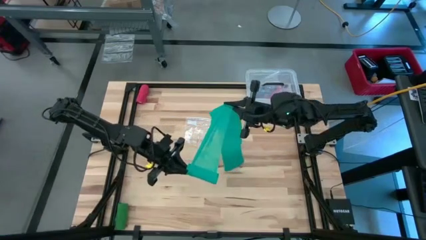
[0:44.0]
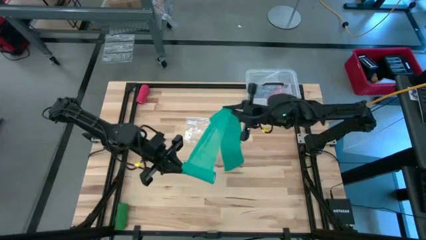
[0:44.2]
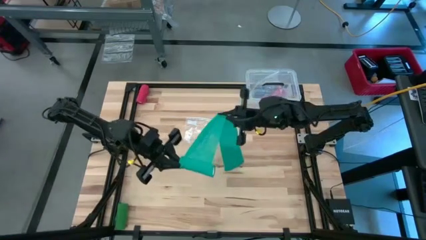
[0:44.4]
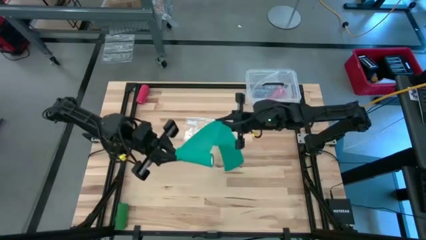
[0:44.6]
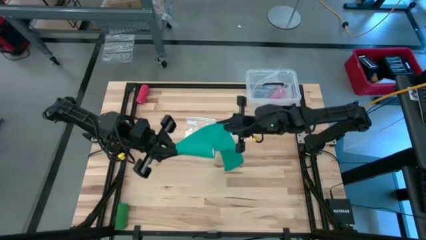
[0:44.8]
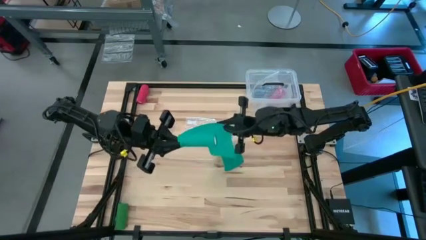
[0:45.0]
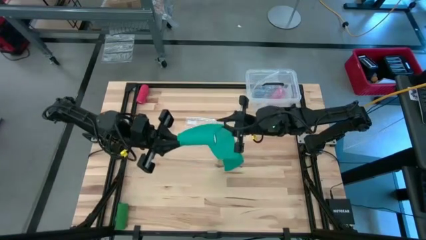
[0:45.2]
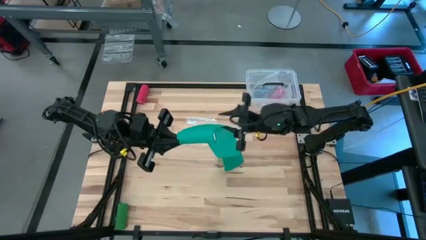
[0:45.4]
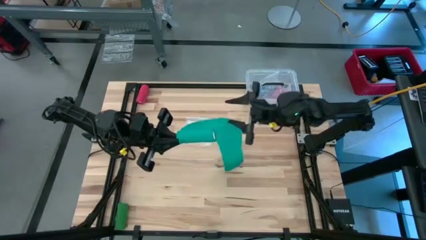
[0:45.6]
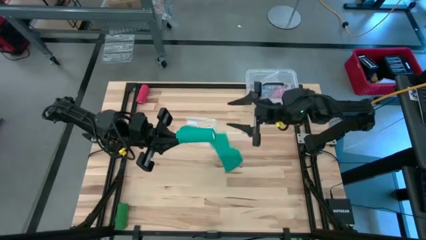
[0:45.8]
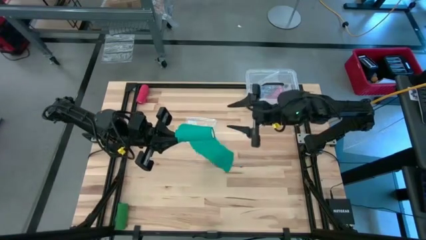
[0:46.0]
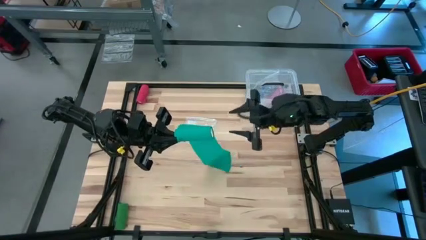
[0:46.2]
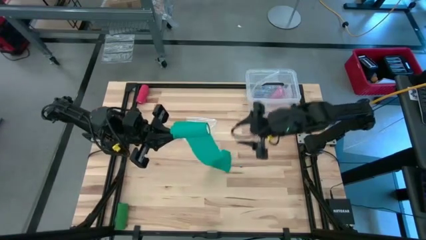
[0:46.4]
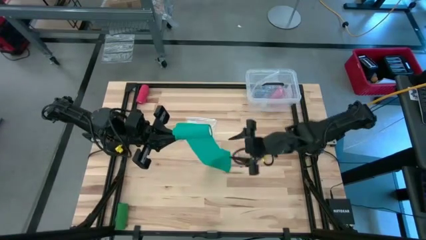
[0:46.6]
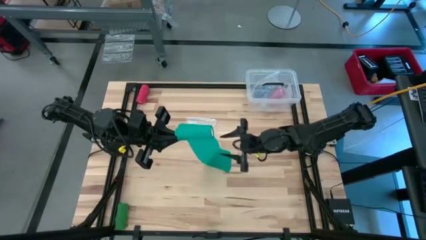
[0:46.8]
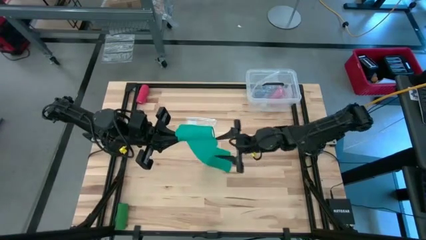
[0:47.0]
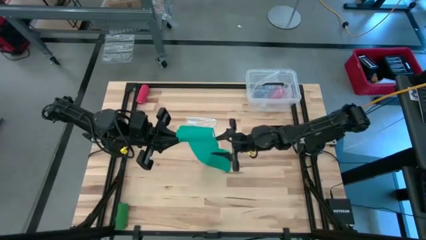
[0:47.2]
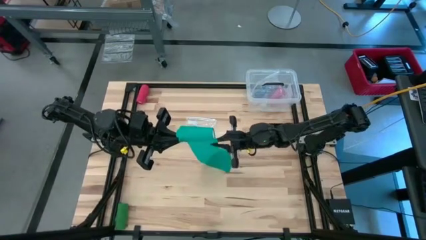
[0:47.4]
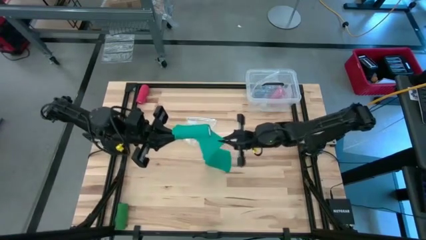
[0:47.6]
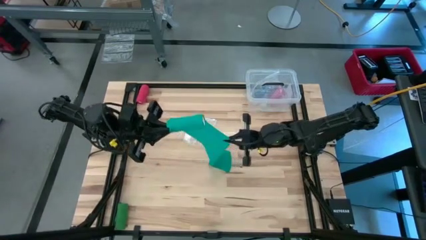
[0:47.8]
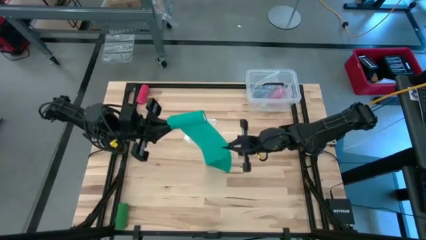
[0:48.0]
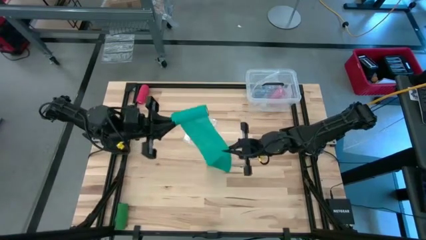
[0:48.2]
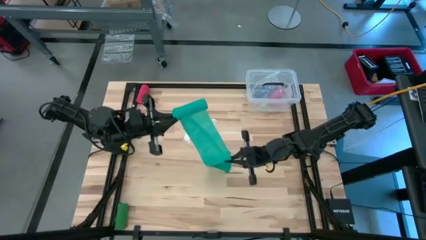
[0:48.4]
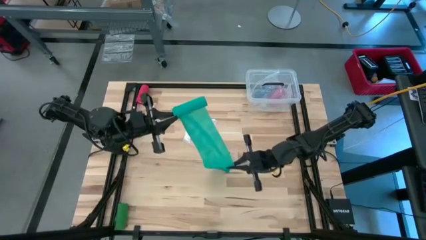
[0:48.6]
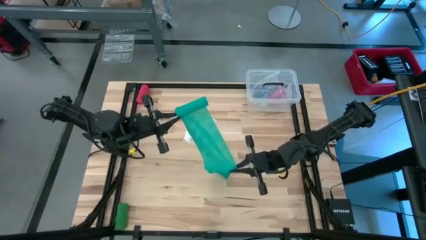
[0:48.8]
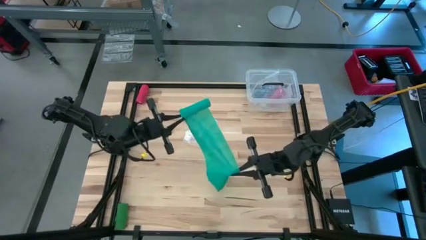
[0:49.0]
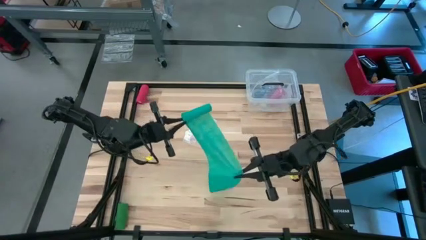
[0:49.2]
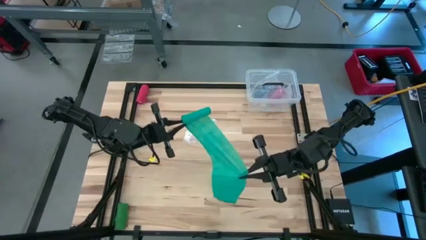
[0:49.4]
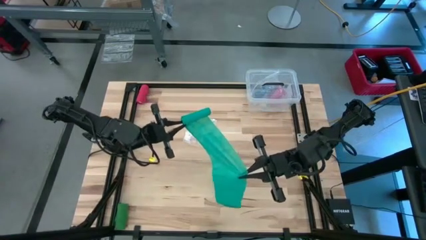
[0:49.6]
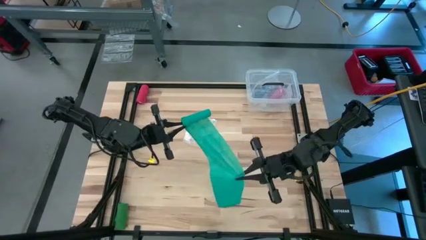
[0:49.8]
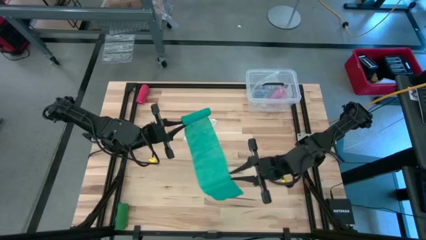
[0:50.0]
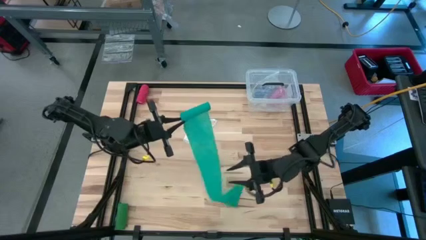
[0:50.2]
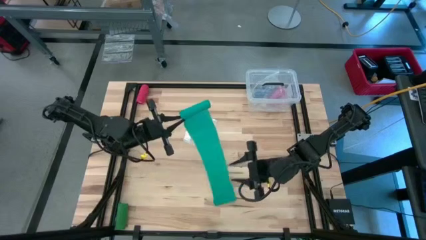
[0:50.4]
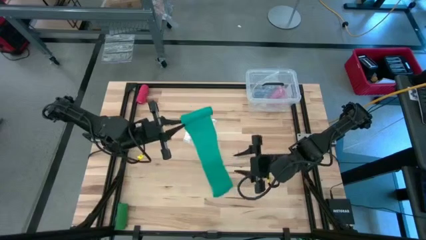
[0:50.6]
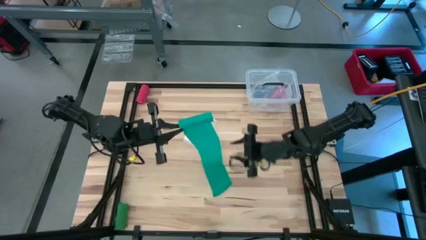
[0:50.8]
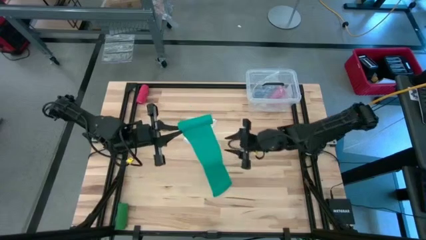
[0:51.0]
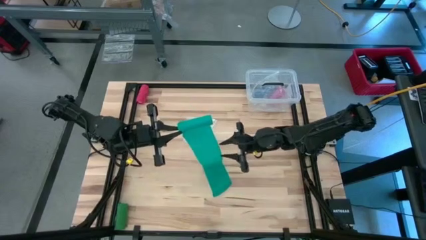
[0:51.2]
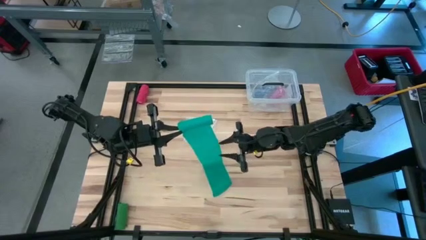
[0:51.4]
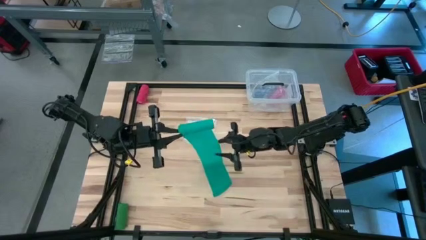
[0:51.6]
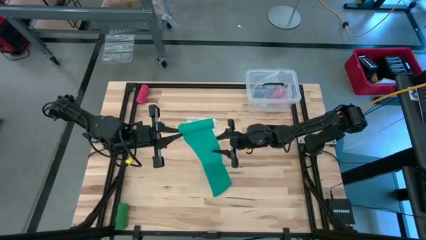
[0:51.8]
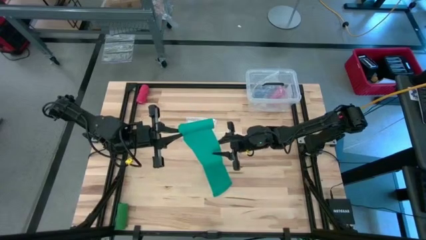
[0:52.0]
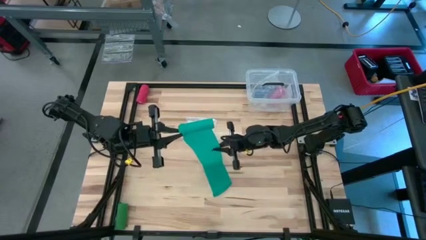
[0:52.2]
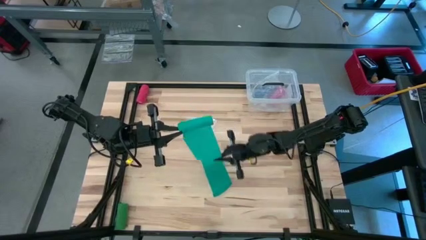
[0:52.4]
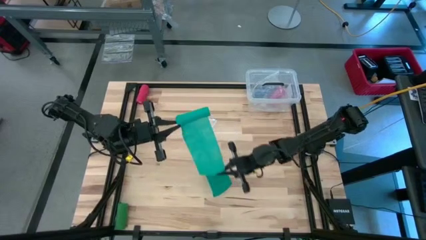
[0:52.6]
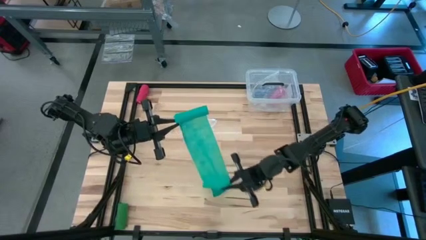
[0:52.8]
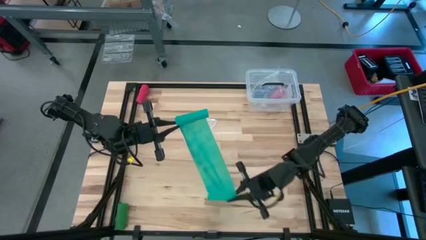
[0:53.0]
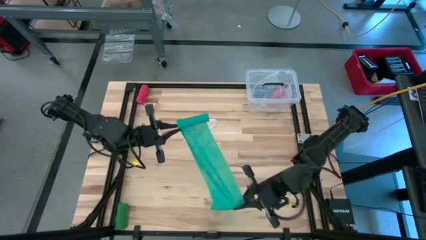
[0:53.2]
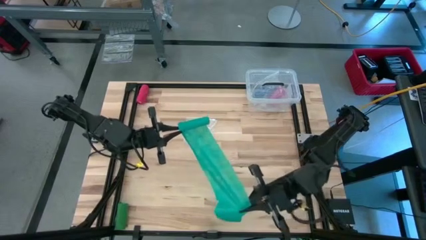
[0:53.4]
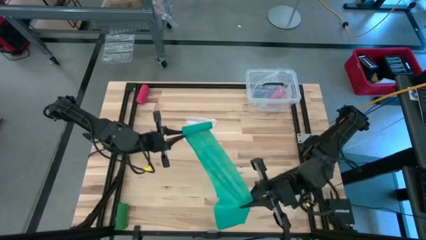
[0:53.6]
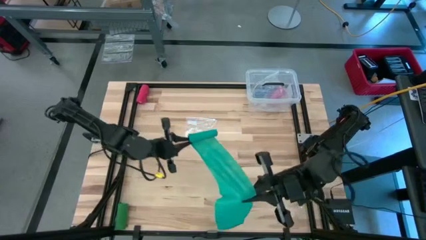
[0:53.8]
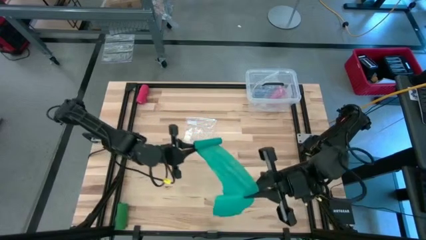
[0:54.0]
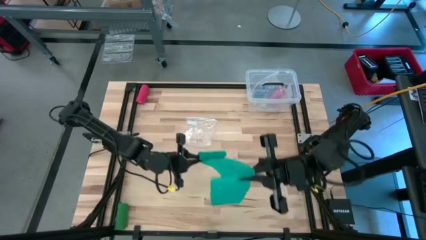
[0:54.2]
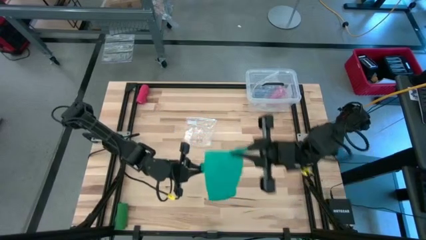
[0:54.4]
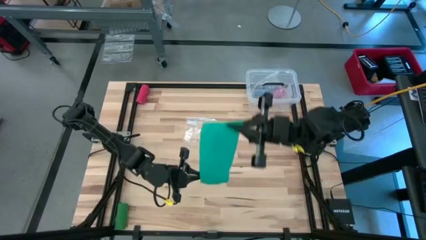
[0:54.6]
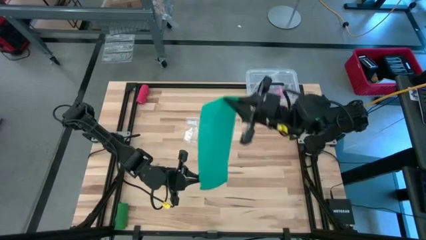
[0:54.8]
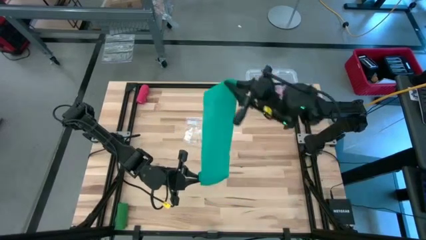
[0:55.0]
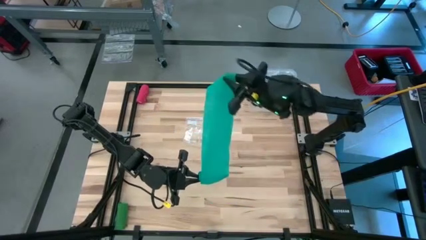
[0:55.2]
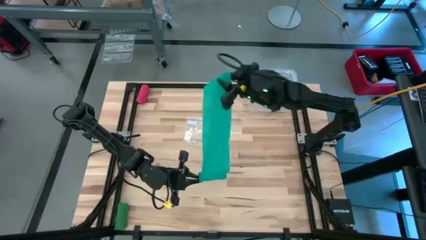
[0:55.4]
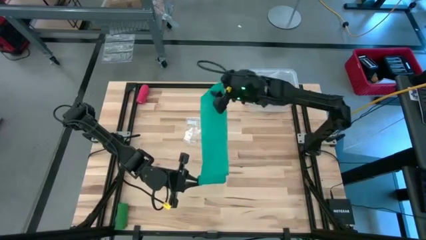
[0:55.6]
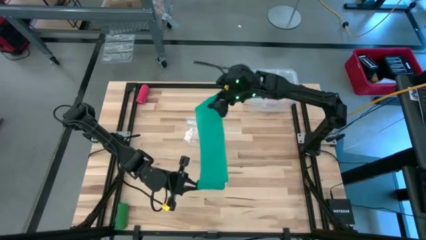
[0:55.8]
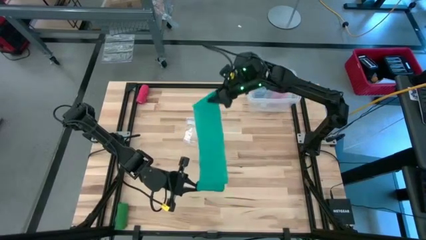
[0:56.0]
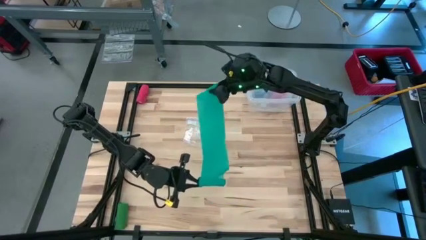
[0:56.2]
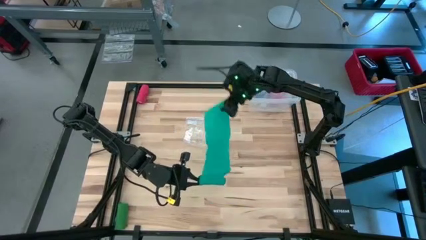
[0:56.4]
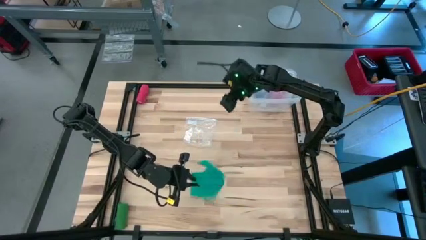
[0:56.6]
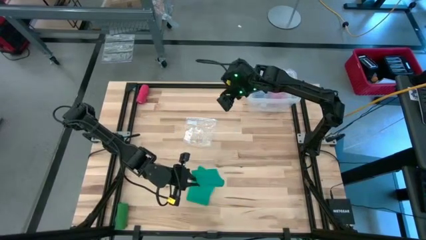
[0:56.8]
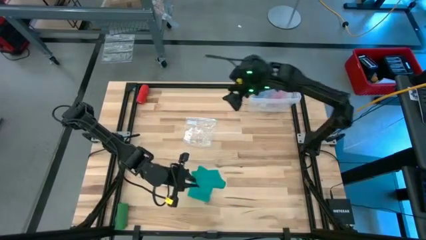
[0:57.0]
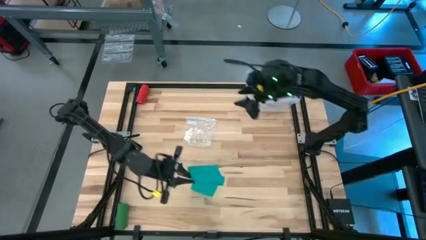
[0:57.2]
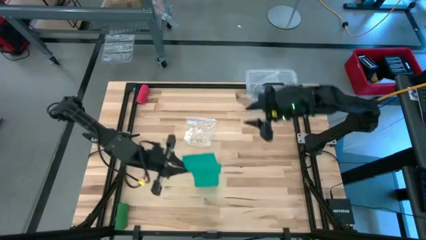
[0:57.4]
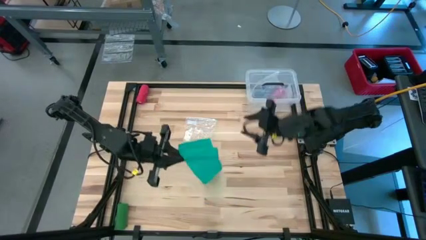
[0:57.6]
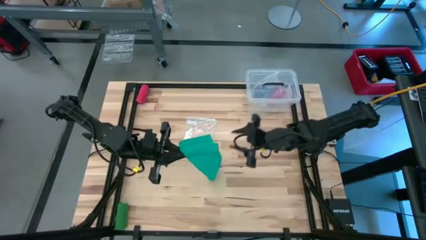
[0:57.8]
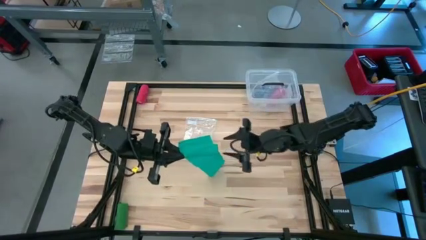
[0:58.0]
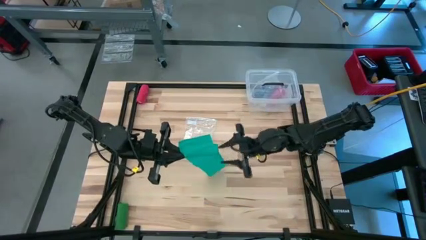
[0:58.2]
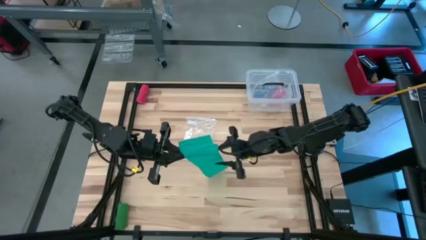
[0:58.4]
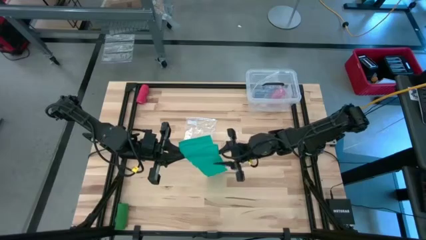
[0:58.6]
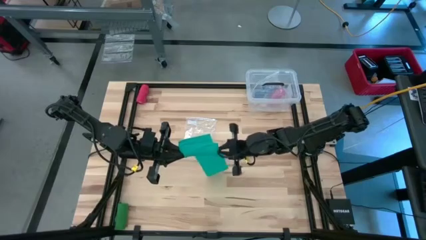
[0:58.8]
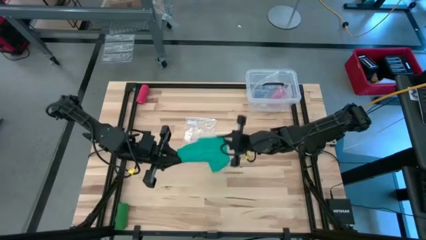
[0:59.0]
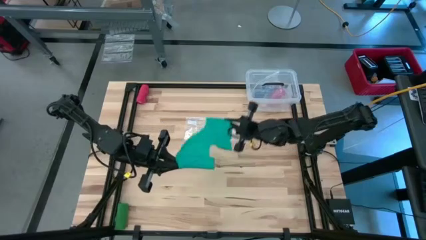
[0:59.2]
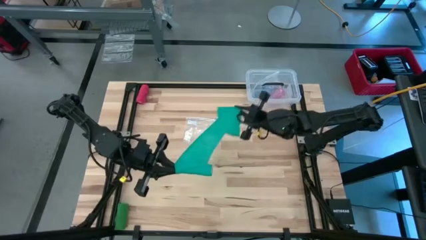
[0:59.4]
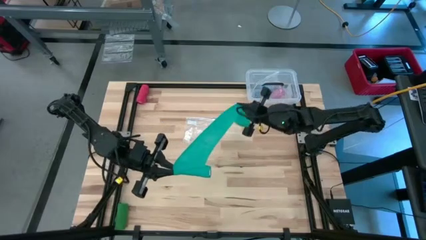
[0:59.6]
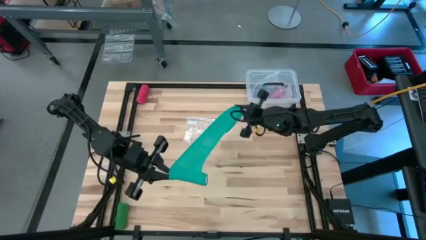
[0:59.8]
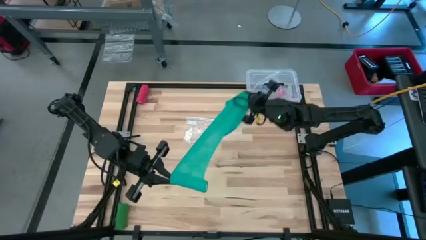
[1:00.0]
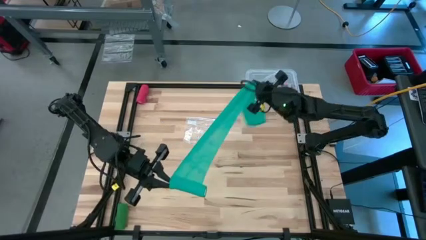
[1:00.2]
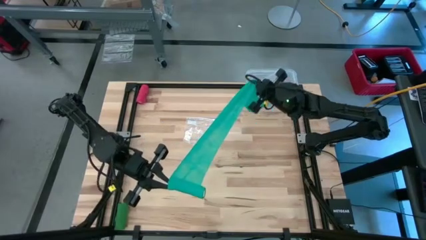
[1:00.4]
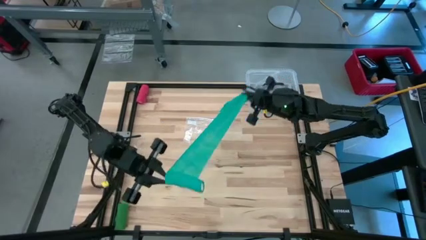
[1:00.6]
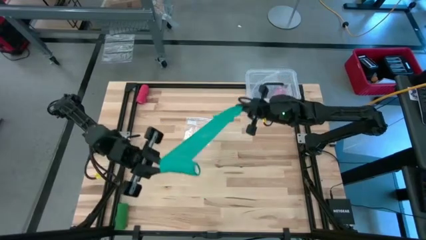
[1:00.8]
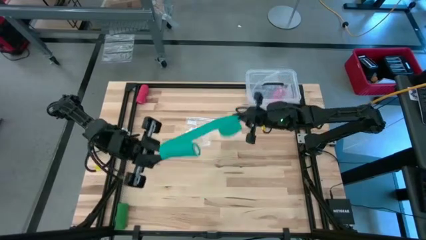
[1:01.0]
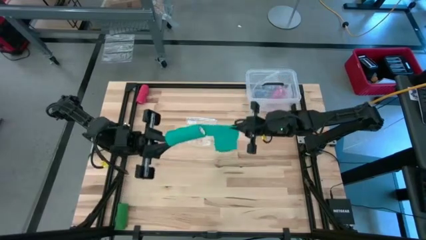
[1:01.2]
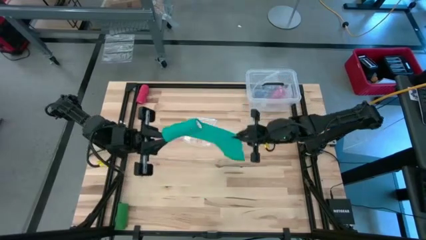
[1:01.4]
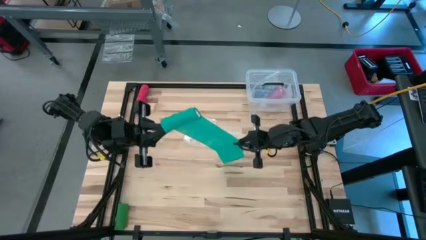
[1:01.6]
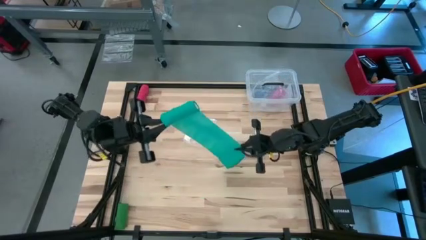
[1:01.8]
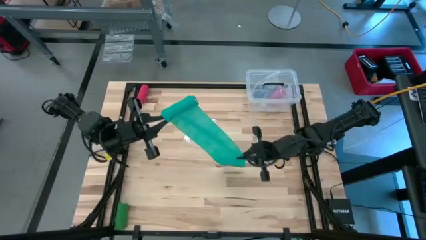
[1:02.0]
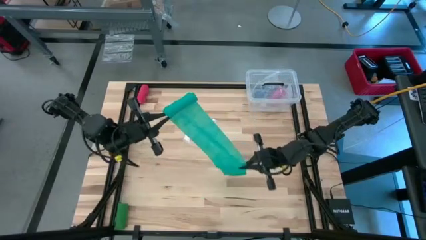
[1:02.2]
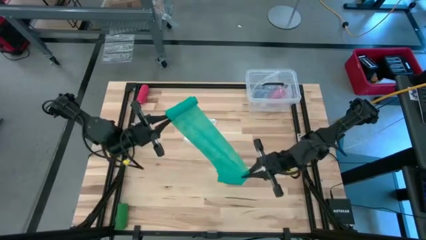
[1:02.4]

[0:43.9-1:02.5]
Task: Roll bandage
Roll the green bandage
